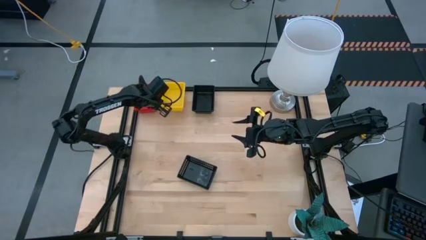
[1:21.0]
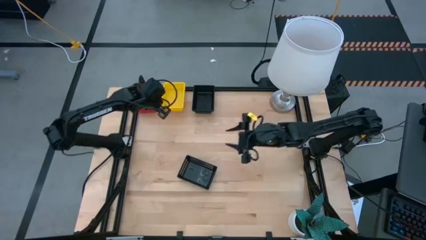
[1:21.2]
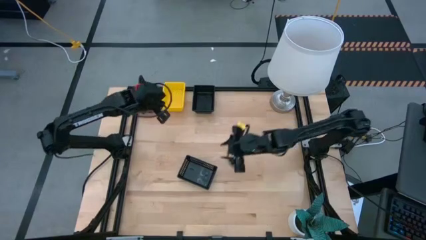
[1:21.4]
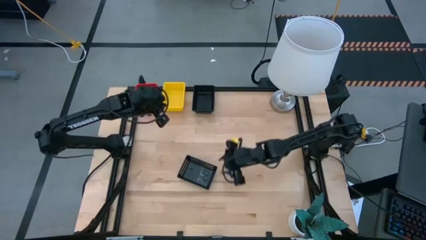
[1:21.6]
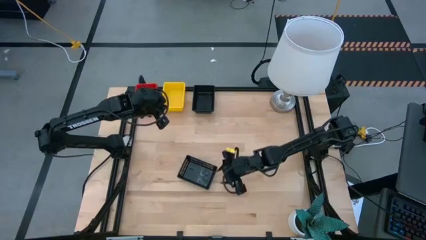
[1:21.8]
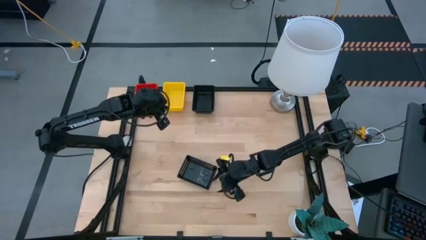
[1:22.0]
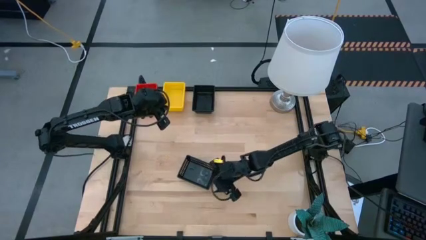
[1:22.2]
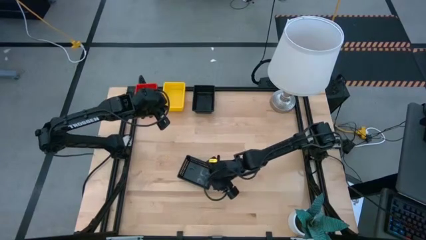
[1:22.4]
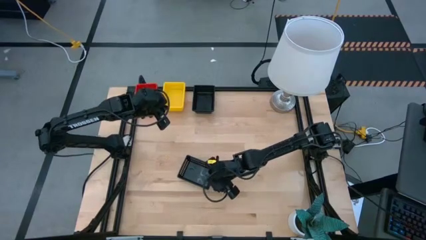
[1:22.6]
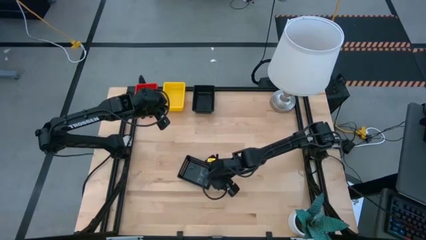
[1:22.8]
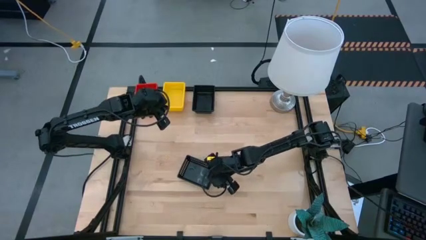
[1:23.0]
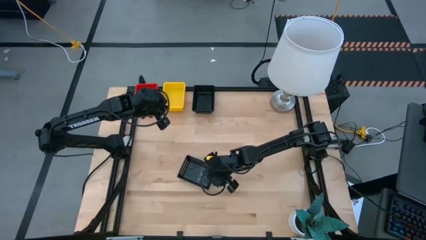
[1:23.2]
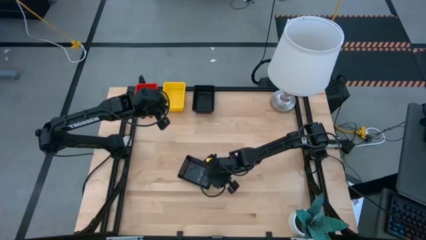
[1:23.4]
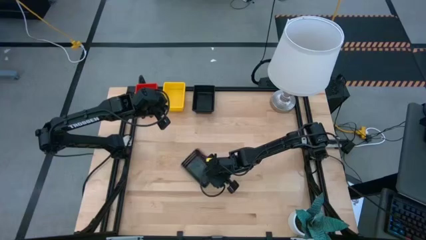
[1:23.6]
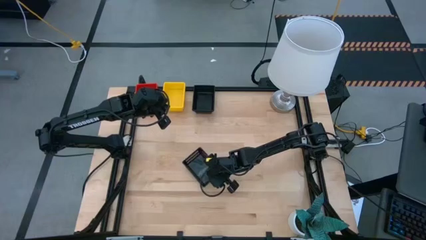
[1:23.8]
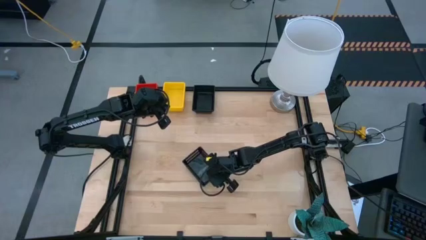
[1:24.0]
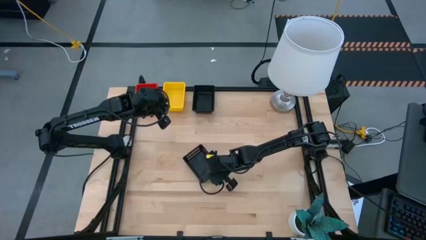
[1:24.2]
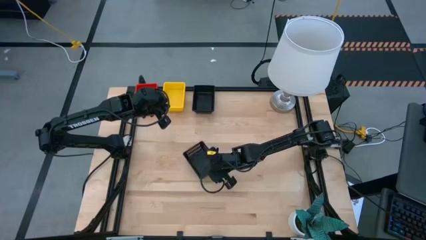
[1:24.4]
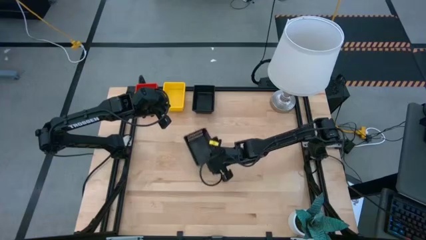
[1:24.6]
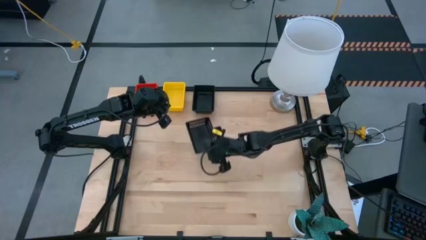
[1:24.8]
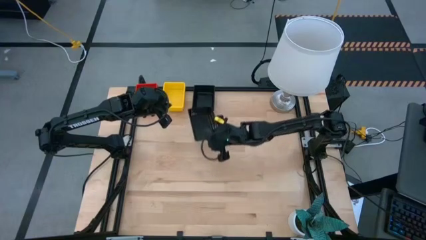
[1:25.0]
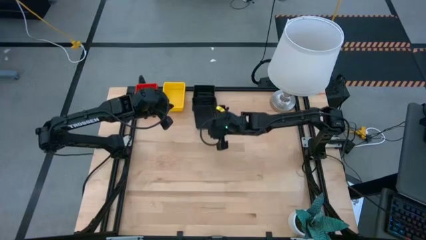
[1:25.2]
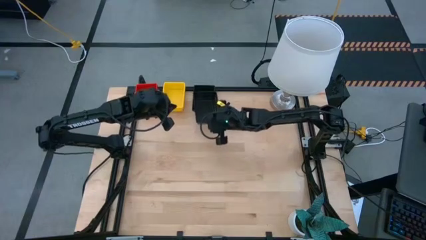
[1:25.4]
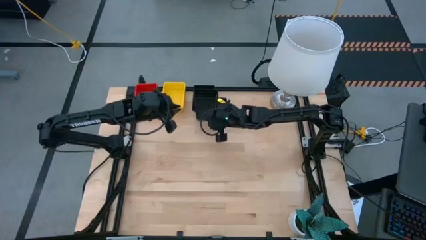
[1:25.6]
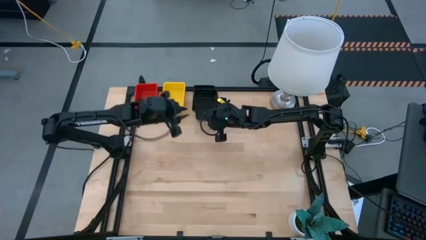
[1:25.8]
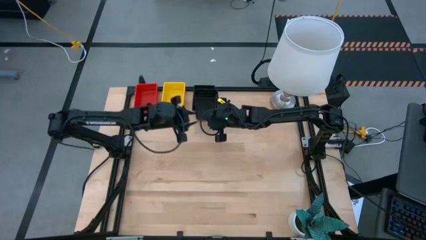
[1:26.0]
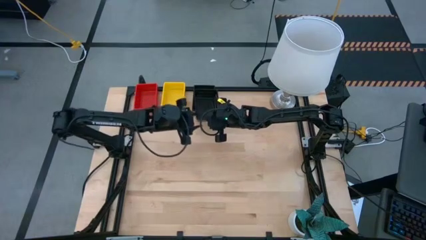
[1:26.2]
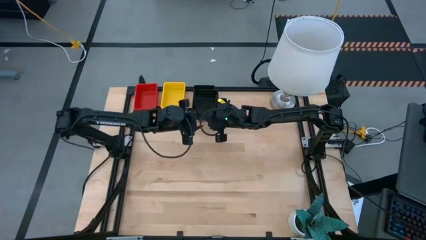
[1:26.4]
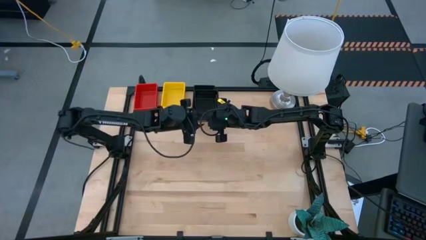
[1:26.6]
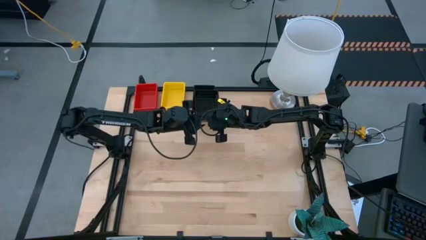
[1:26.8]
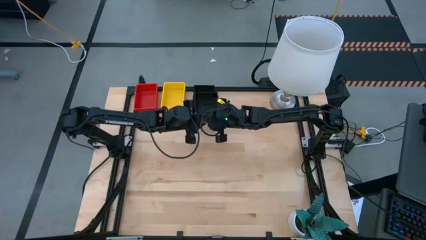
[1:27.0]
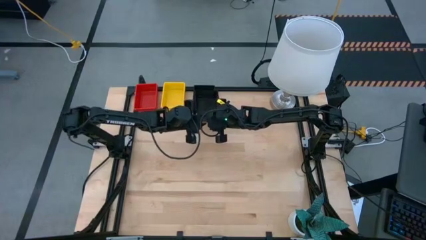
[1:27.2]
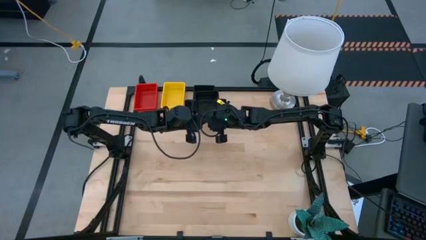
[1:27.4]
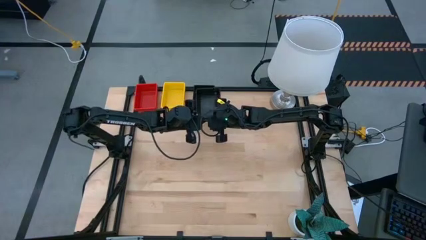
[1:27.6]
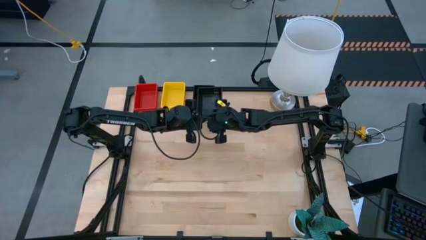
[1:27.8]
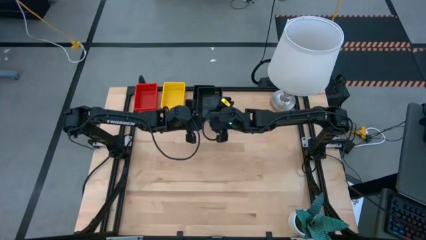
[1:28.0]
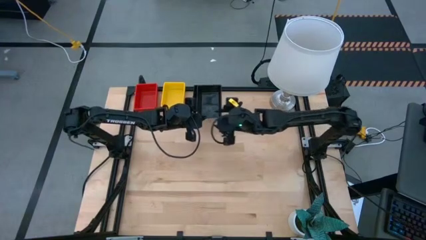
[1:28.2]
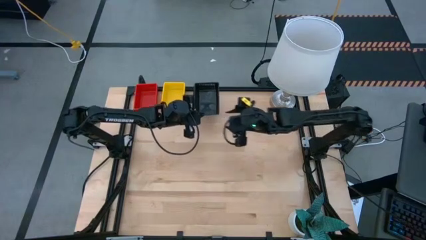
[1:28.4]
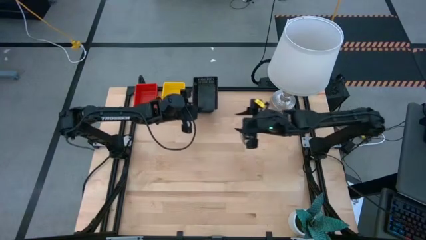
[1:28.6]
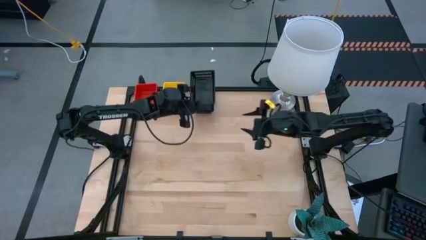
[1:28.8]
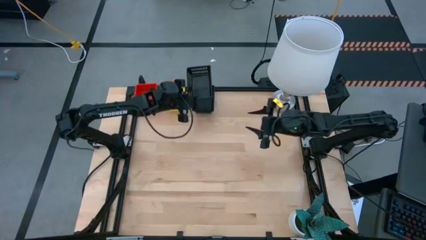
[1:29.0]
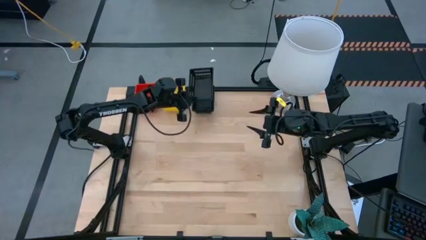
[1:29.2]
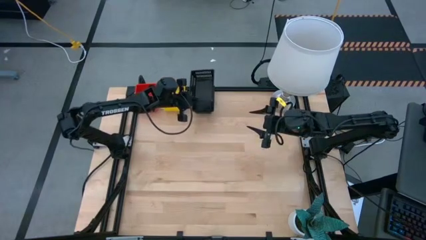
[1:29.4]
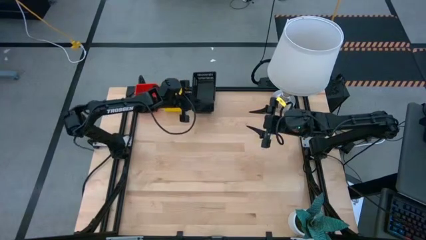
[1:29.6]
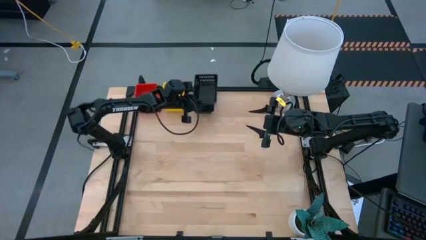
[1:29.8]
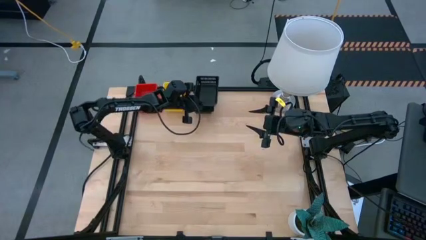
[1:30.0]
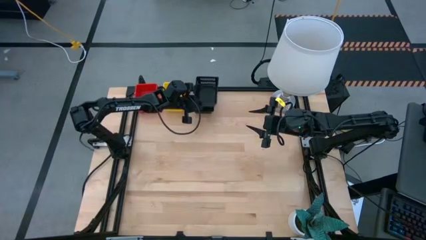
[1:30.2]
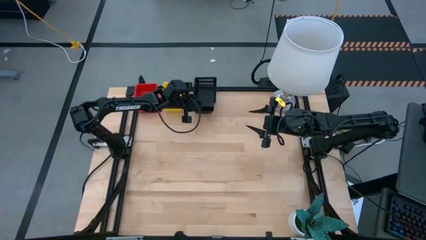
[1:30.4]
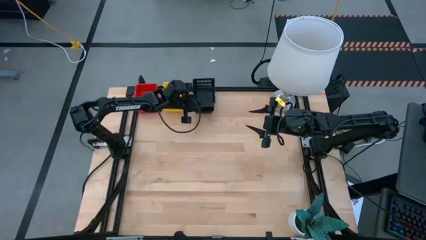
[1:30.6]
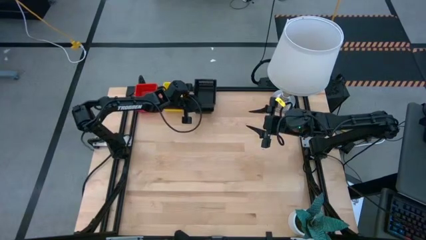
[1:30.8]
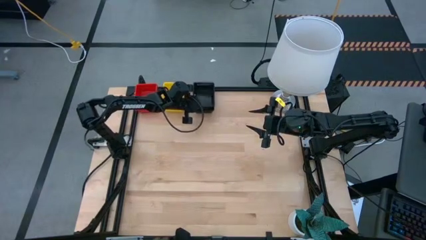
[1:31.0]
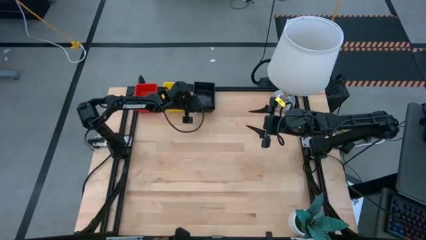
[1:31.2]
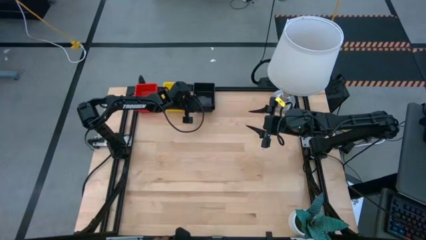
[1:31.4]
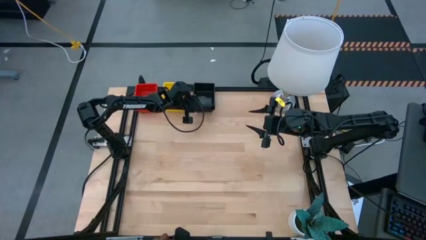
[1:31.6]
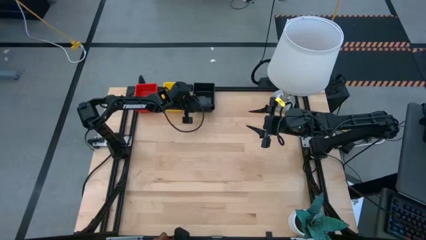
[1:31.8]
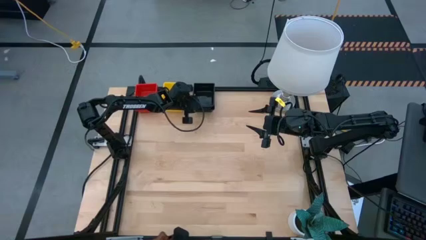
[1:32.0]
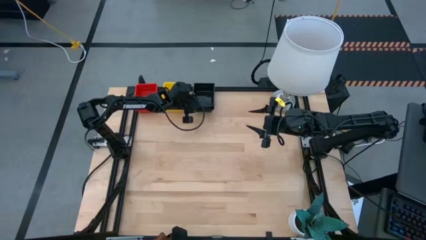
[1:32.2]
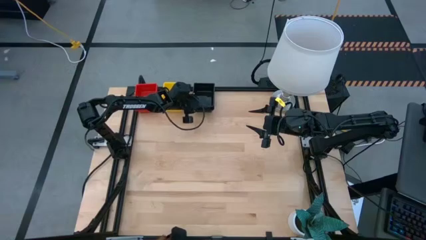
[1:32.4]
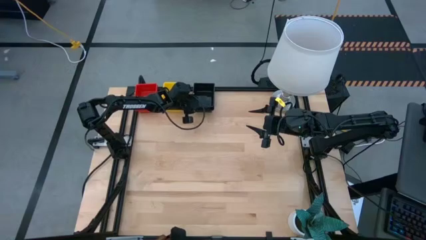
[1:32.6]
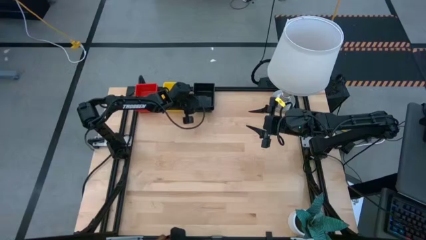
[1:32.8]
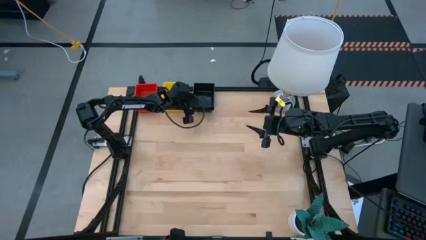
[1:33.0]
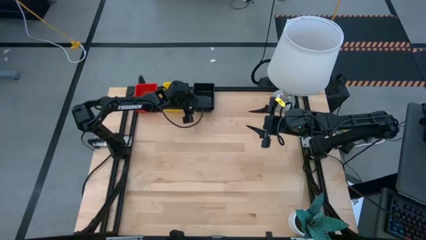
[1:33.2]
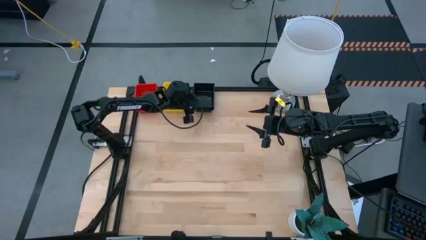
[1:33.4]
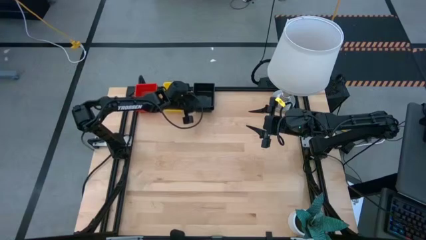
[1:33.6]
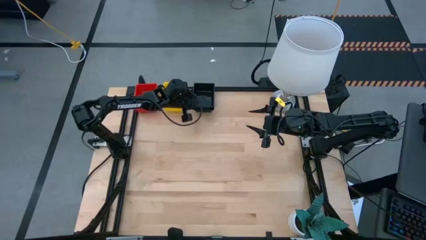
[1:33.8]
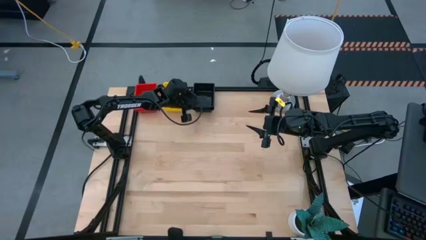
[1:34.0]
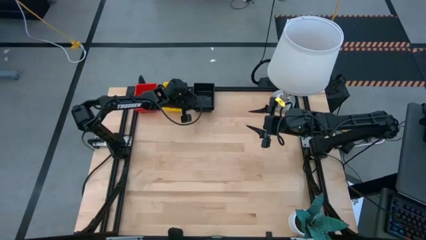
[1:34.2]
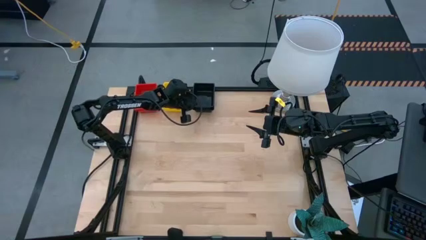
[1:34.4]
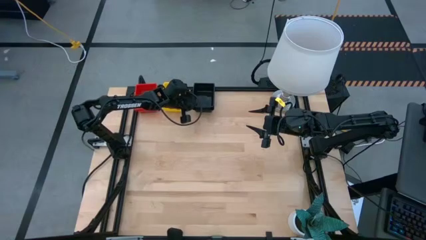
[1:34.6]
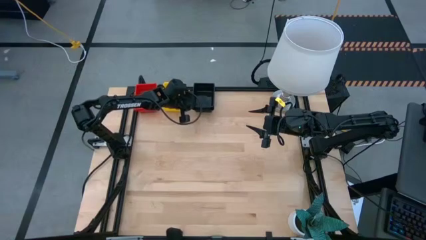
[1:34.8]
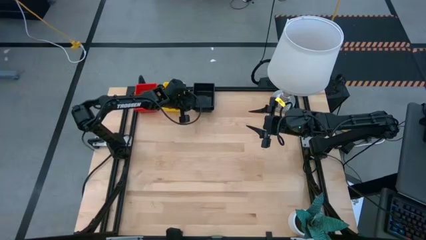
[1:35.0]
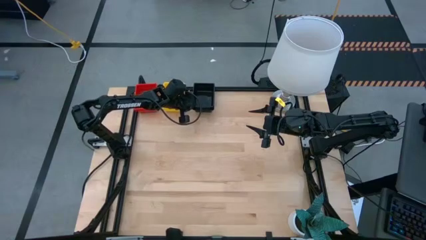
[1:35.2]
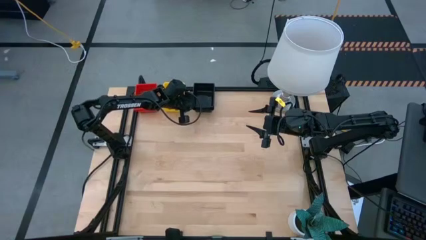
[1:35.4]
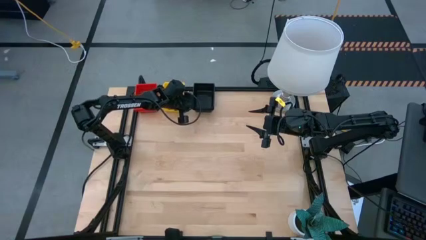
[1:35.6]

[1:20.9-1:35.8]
Stack the bottom black bin on top of the top black bin
